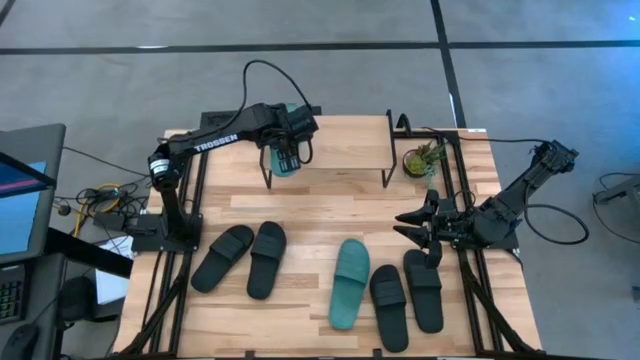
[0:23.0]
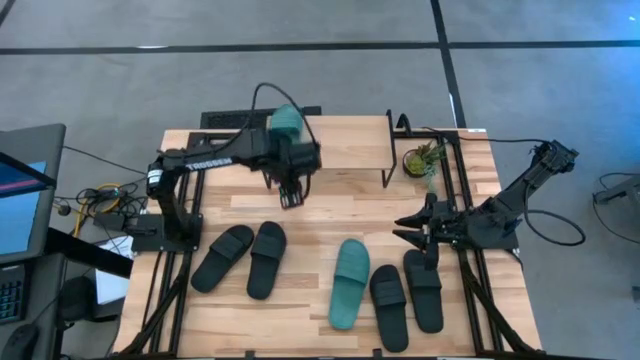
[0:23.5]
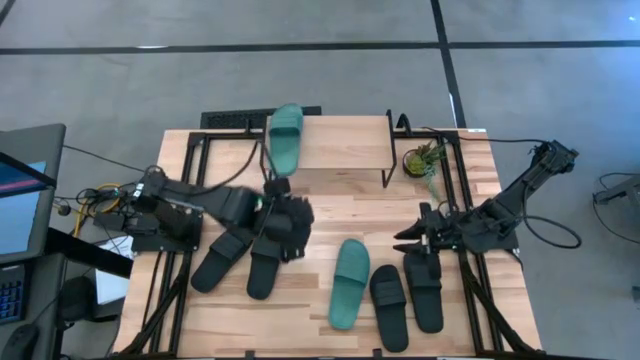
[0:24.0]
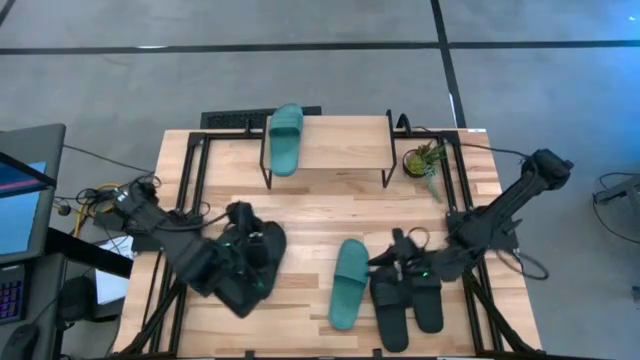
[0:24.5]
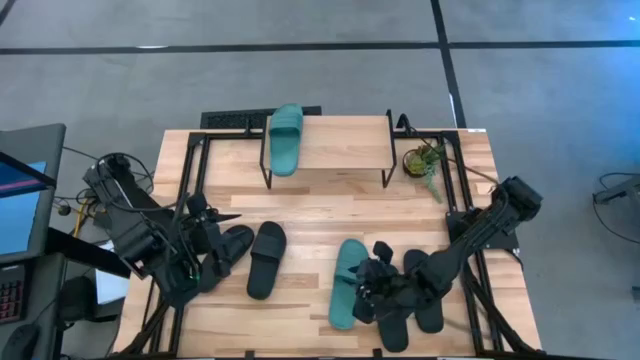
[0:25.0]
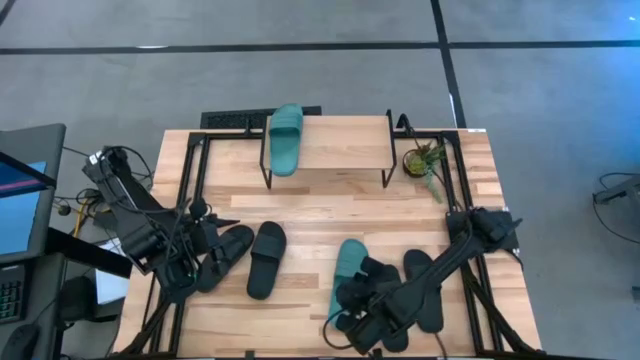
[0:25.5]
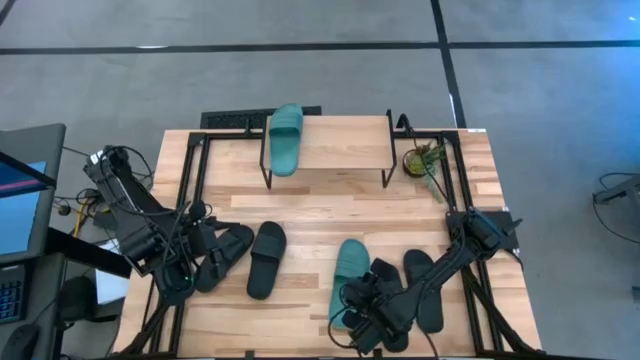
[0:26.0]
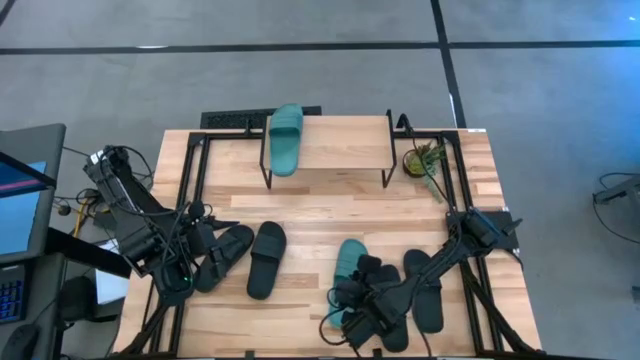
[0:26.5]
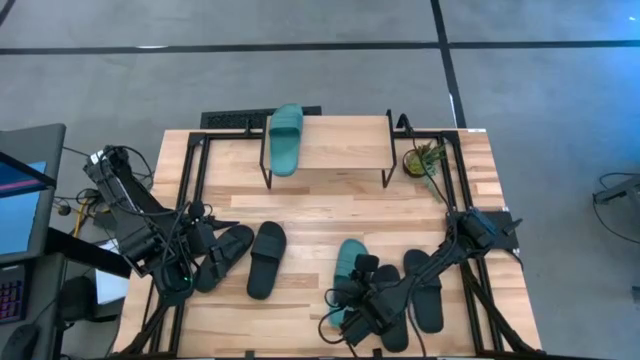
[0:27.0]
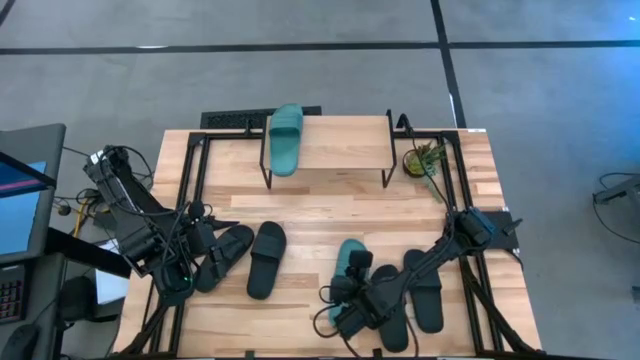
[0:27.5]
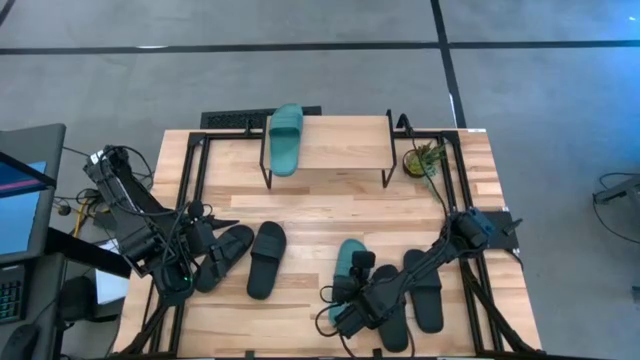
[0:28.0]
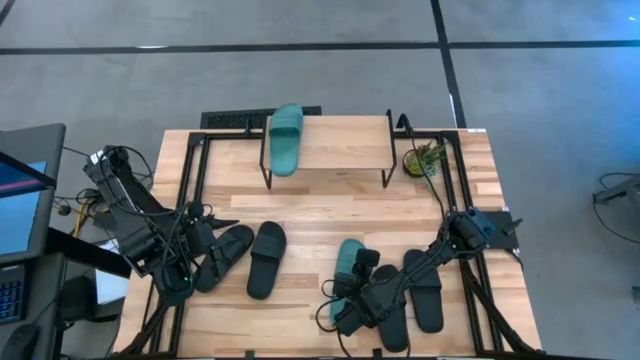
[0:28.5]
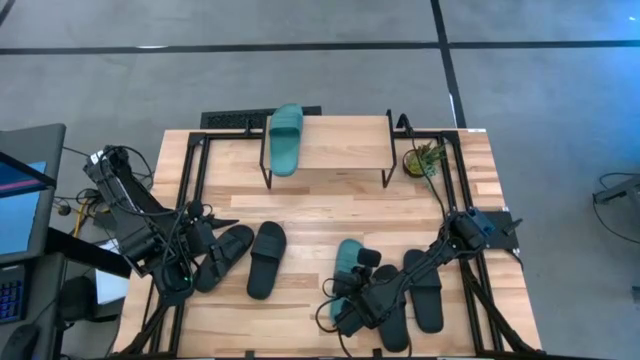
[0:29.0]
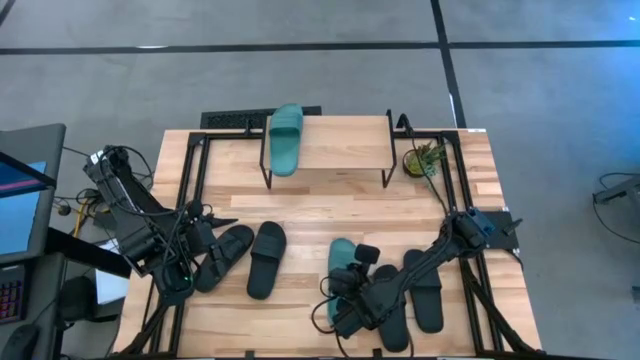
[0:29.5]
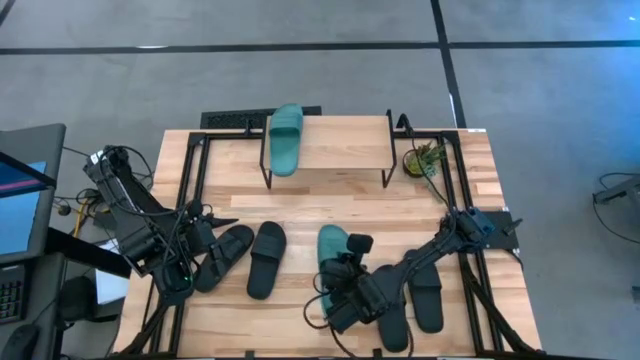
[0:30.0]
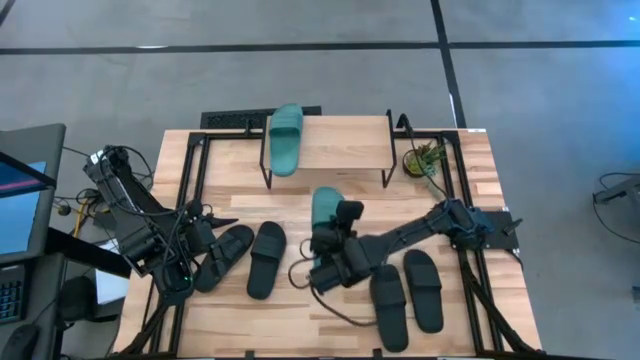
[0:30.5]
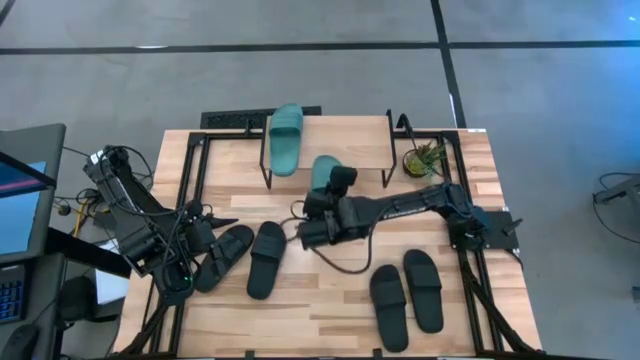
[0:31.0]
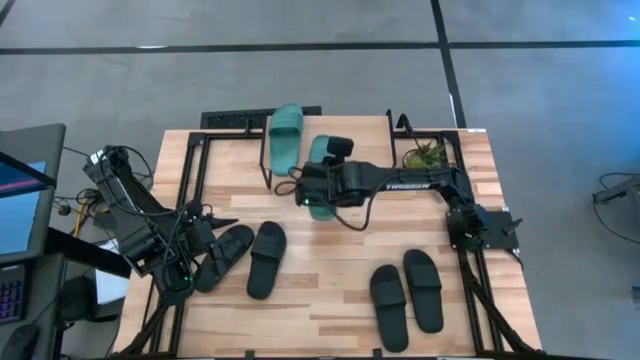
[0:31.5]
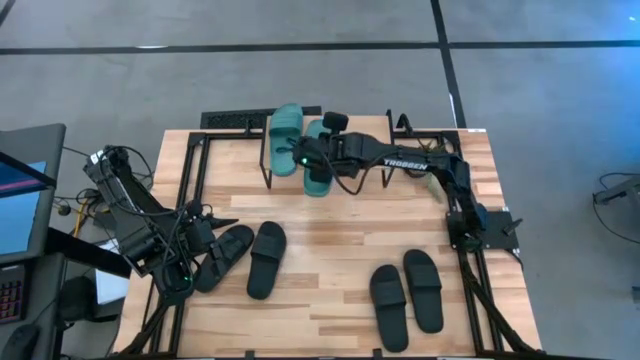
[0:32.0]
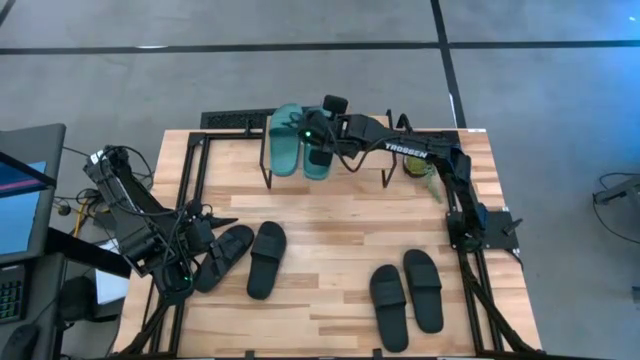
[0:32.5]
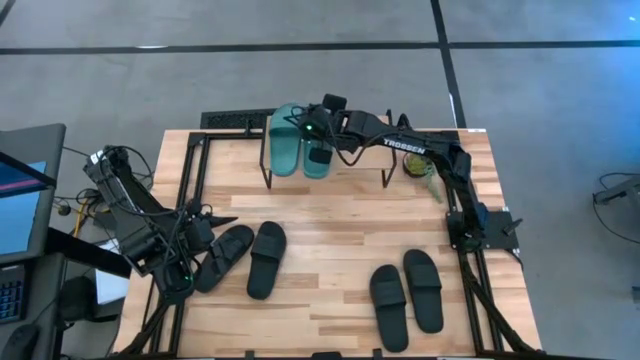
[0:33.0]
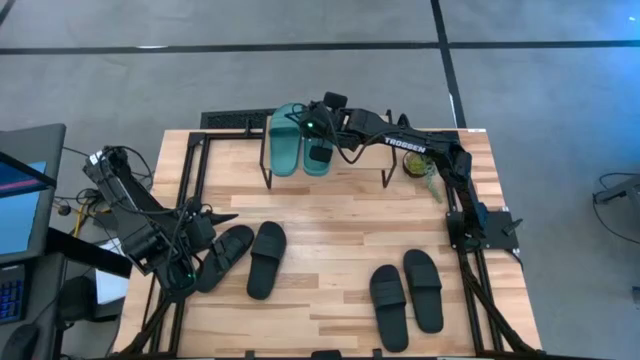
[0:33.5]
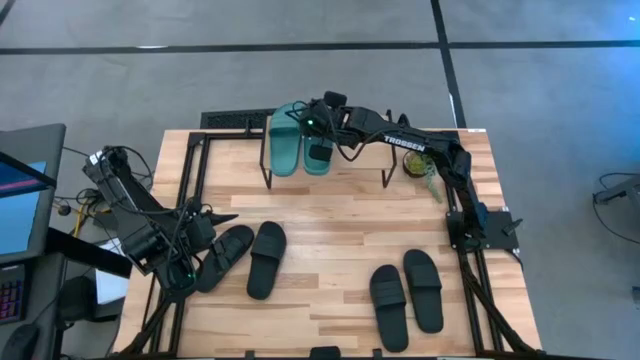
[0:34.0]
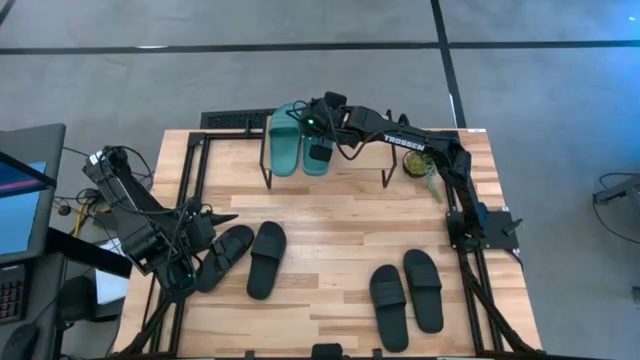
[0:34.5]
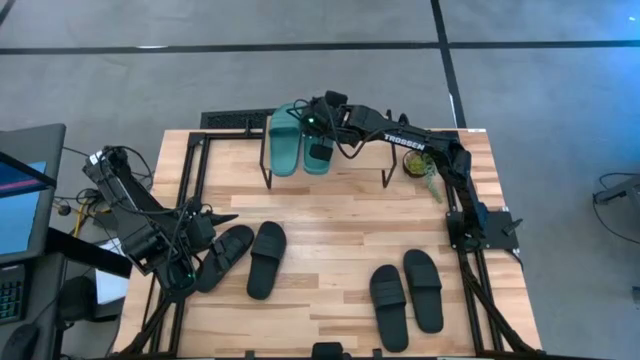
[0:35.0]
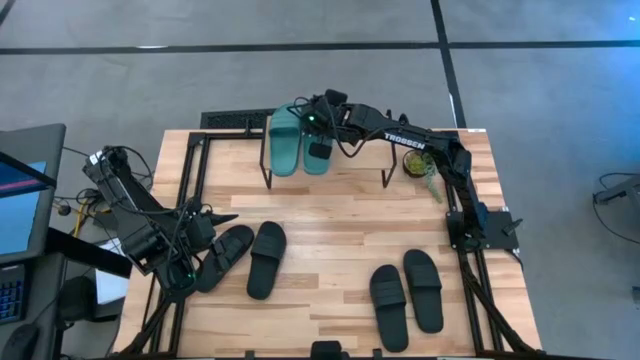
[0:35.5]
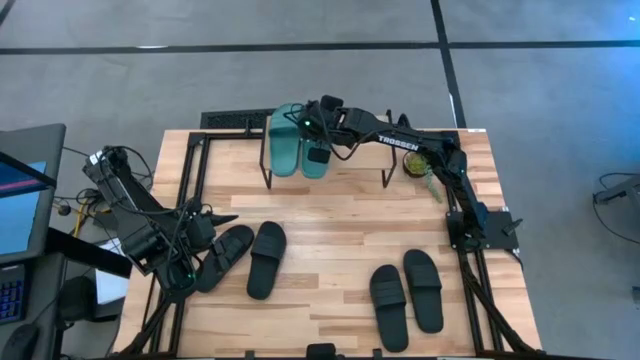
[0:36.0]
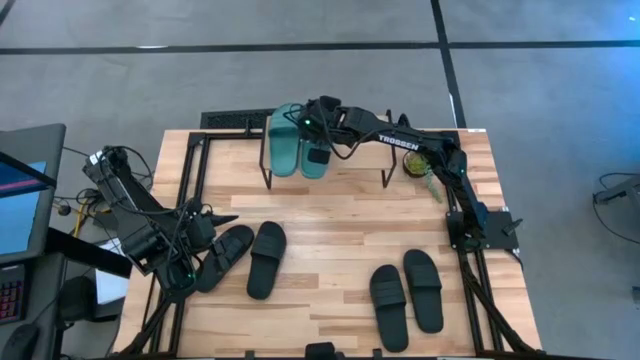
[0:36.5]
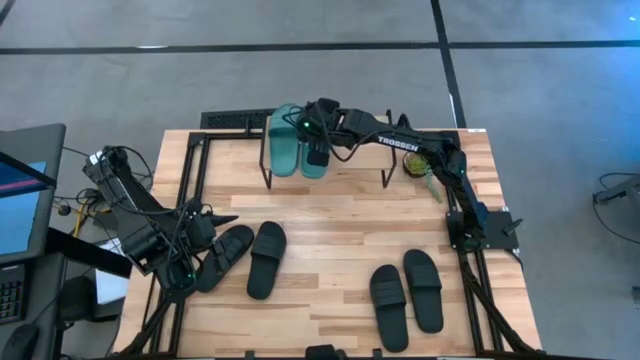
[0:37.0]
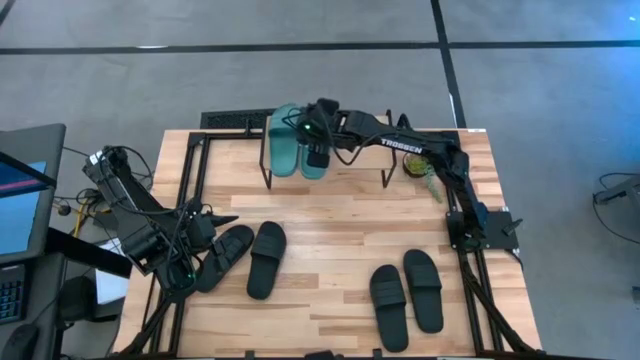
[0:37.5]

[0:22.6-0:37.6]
Task: Pick and place slides into the shelf
Put the green slide on the shelf

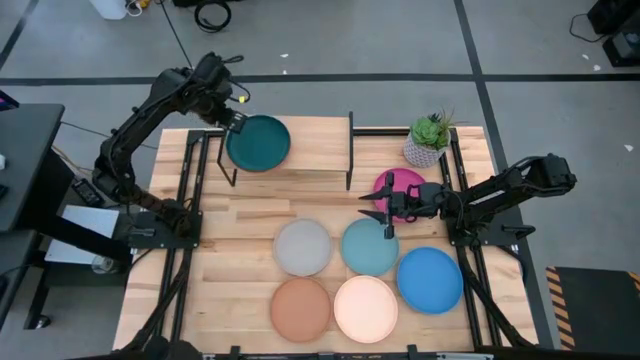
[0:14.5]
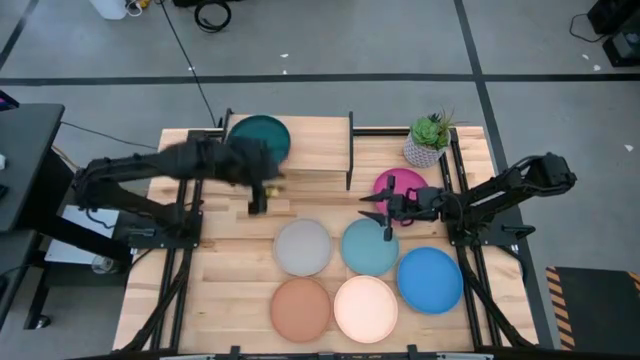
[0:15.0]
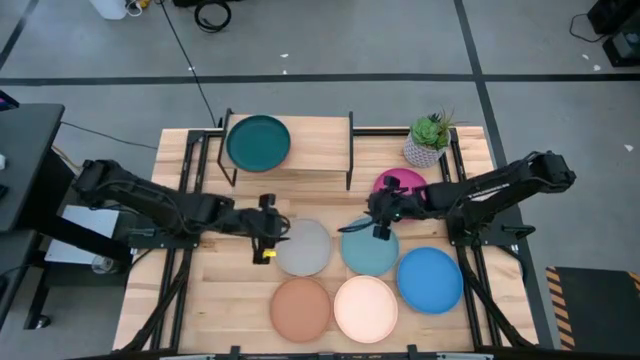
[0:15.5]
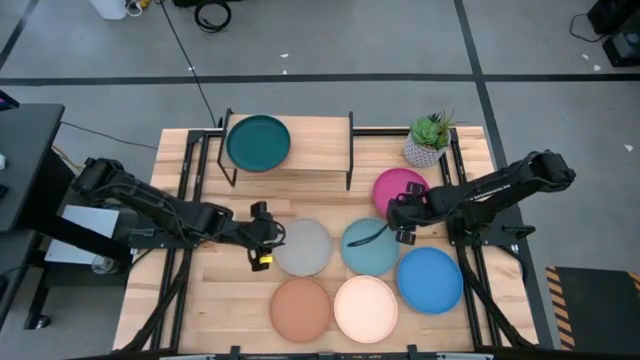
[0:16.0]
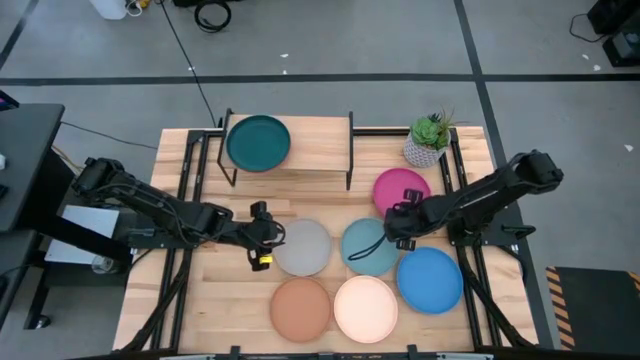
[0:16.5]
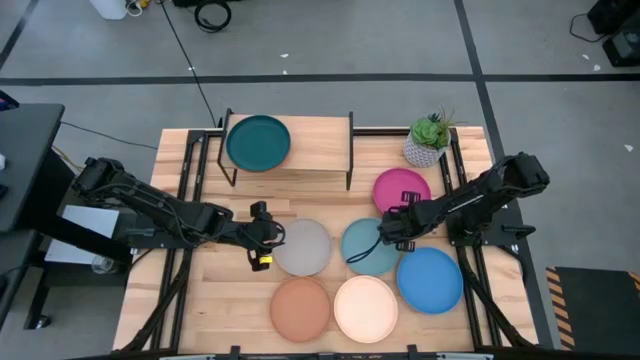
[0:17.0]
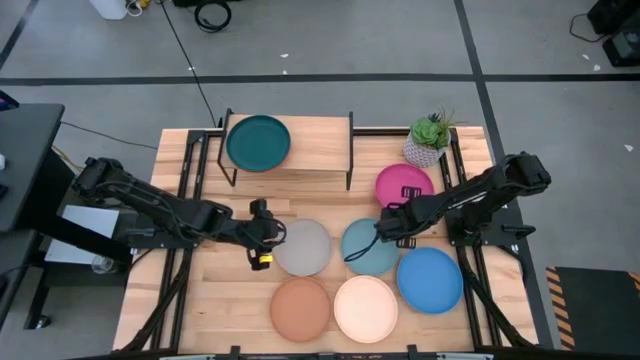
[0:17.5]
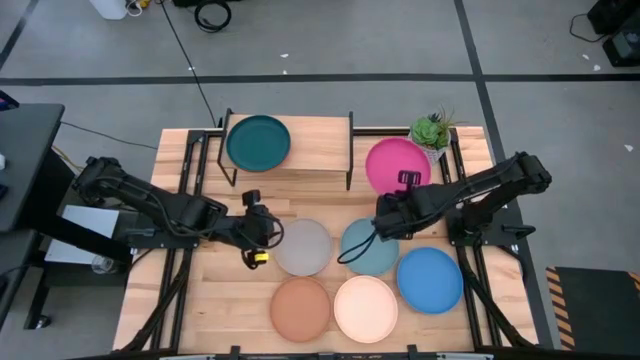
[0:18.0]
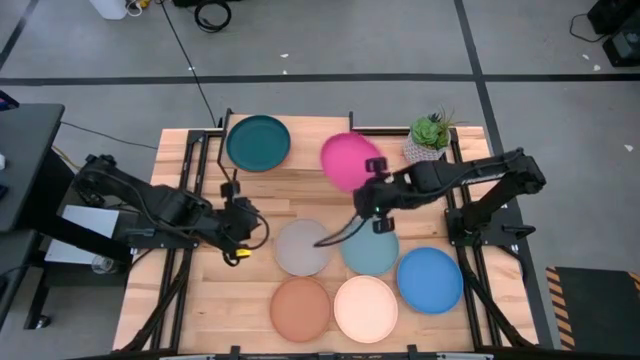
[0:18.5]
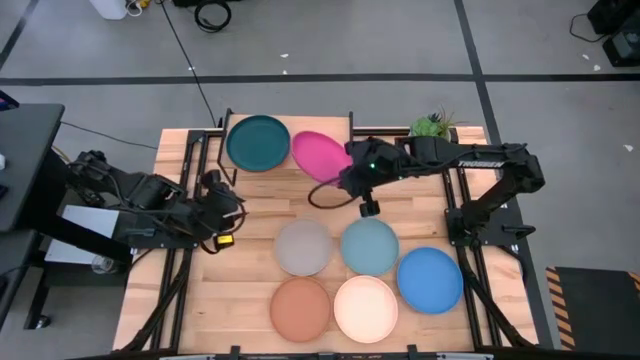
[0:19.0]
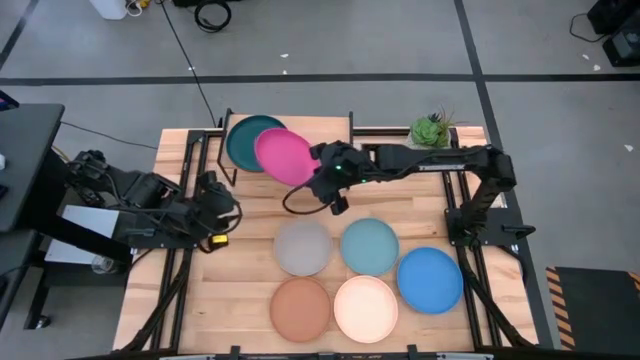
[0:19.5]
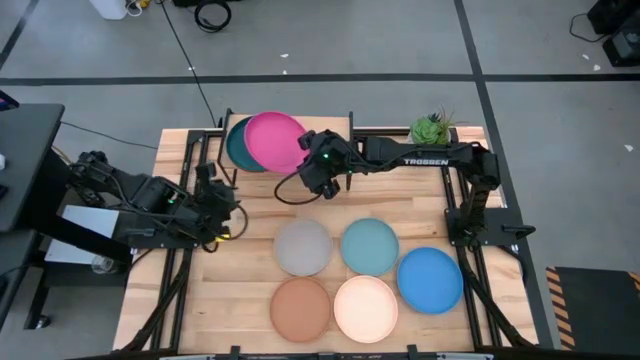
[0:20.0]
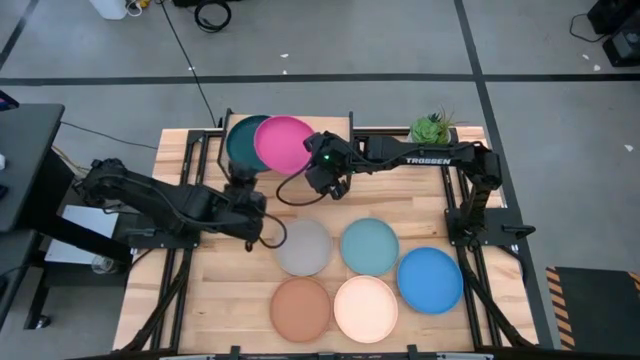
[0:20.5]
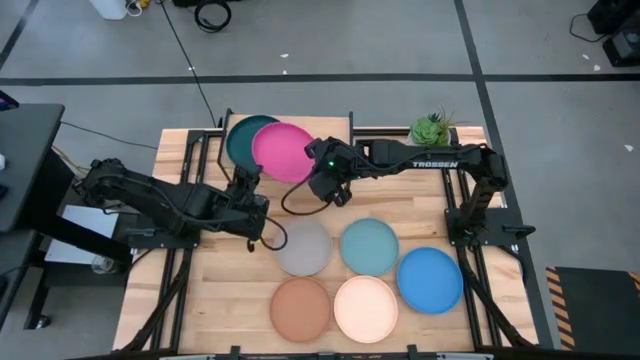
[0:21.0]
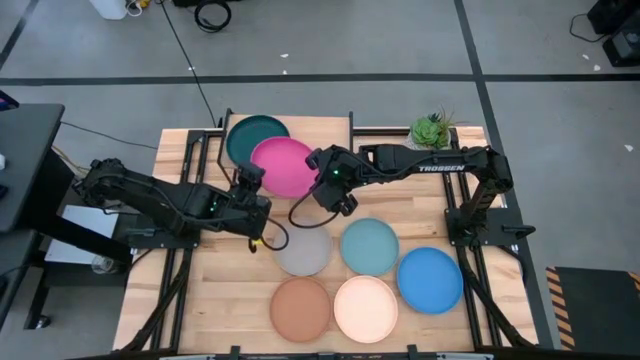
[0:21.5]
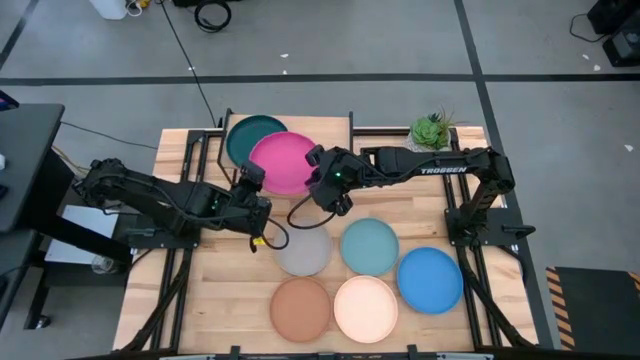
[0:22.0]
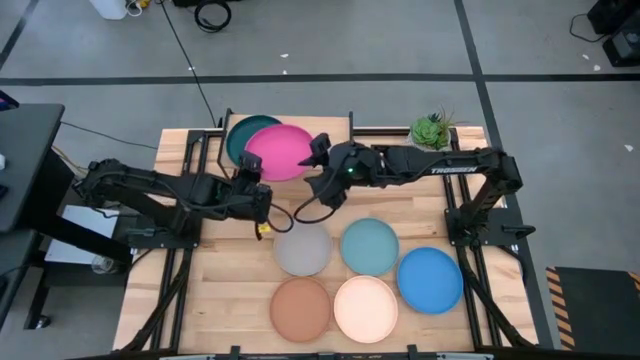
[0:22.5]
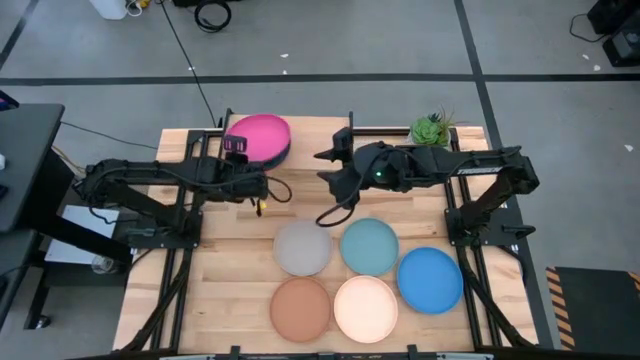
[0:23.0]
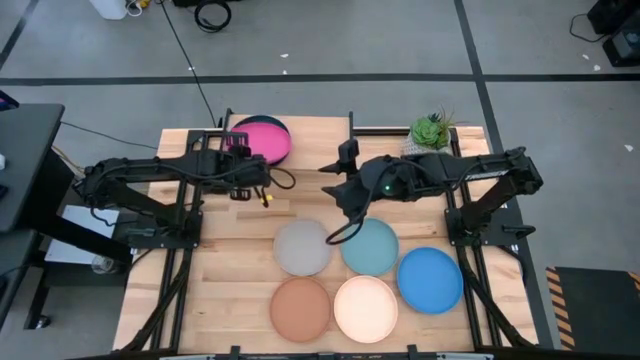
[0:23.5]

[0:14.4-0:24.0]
Task: Place and stack plates onto a shelf
Stack the pink plate on the top of the dark blue
